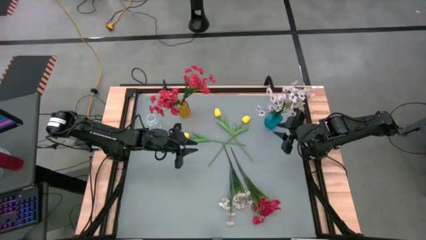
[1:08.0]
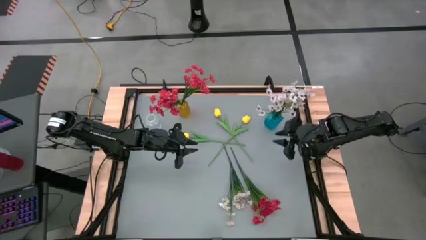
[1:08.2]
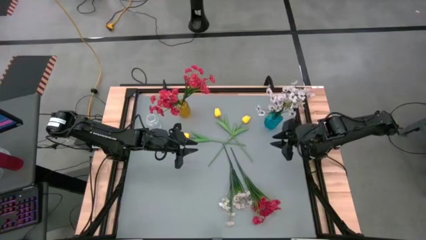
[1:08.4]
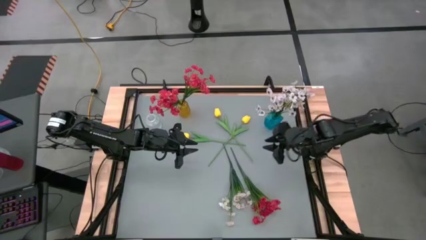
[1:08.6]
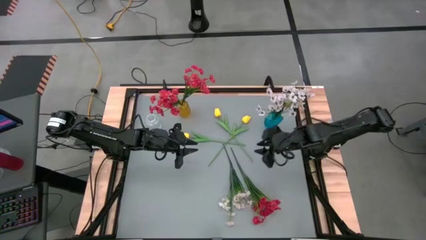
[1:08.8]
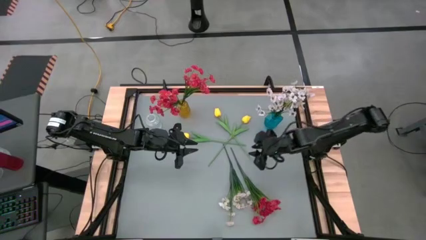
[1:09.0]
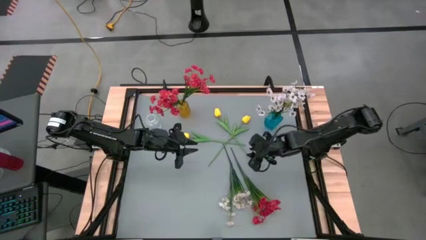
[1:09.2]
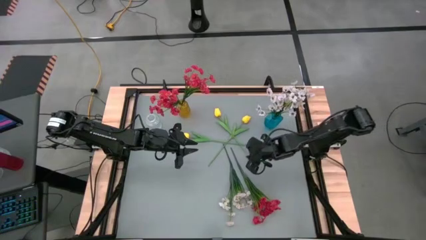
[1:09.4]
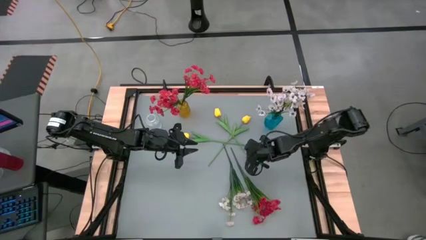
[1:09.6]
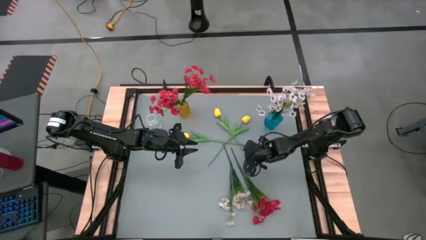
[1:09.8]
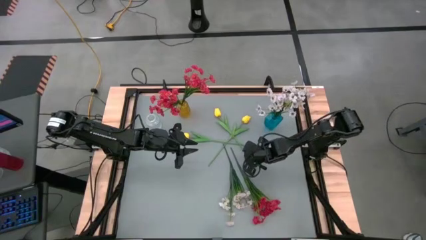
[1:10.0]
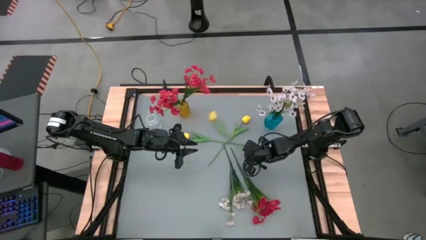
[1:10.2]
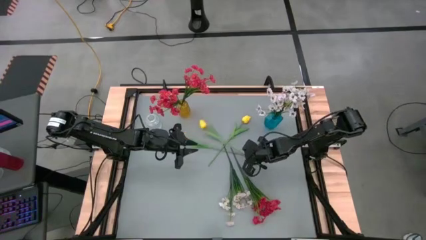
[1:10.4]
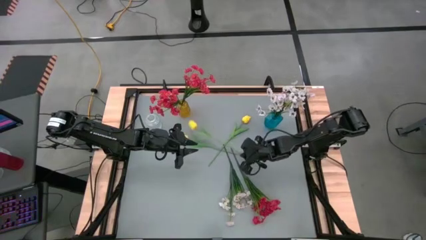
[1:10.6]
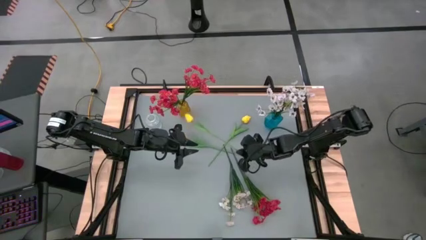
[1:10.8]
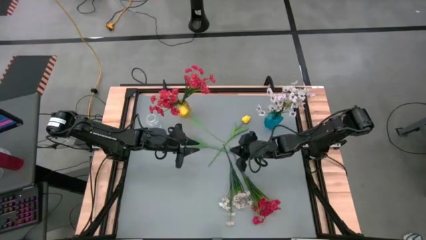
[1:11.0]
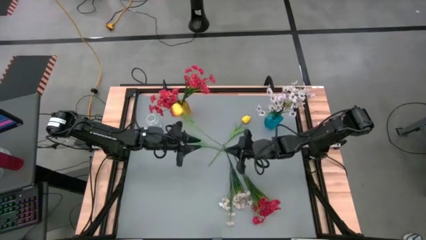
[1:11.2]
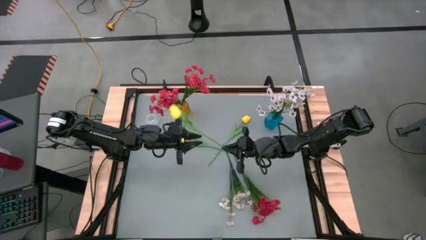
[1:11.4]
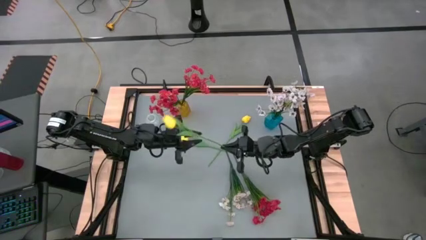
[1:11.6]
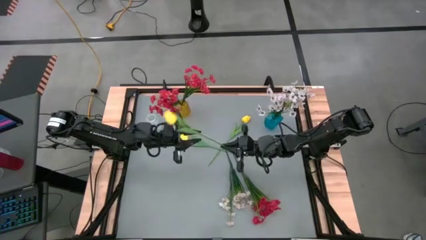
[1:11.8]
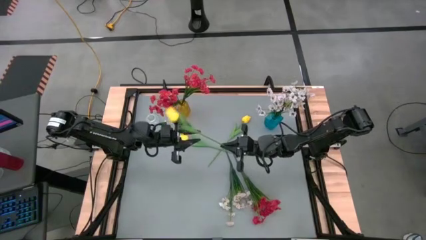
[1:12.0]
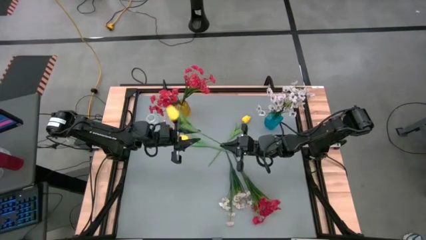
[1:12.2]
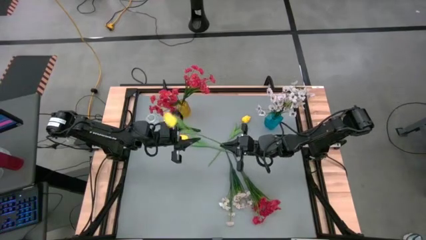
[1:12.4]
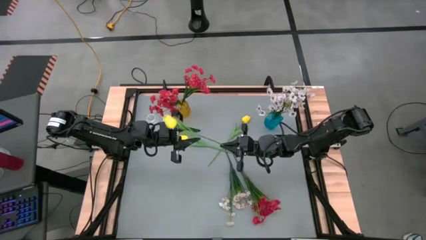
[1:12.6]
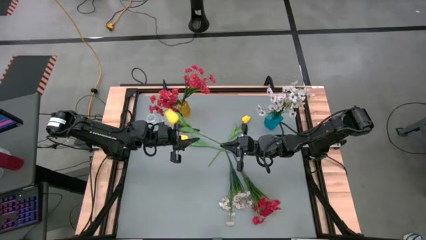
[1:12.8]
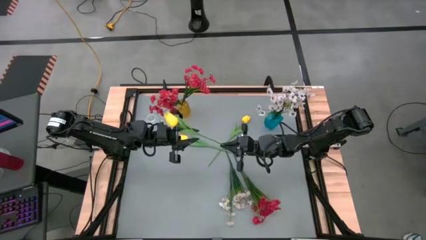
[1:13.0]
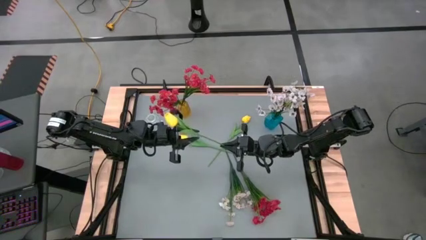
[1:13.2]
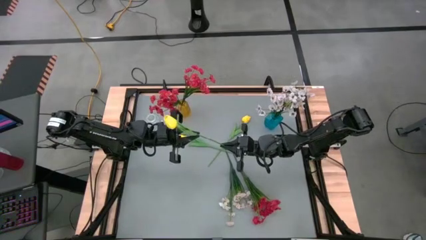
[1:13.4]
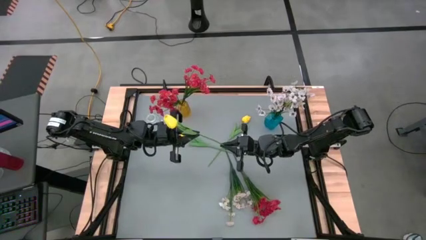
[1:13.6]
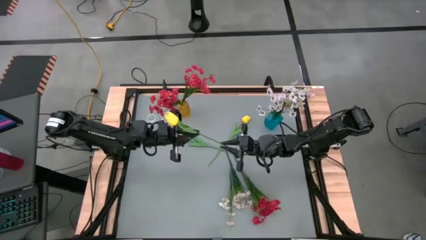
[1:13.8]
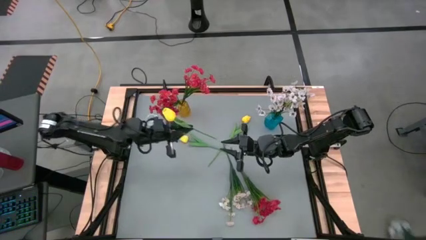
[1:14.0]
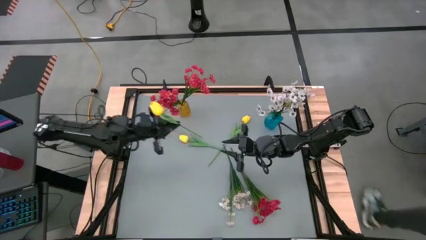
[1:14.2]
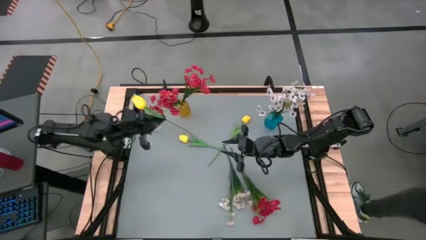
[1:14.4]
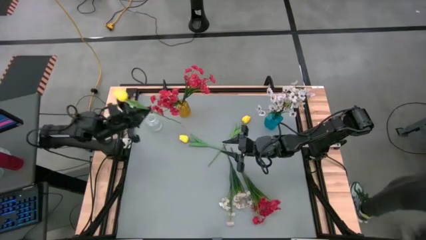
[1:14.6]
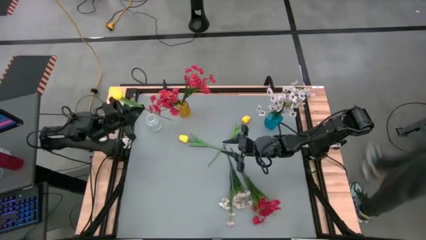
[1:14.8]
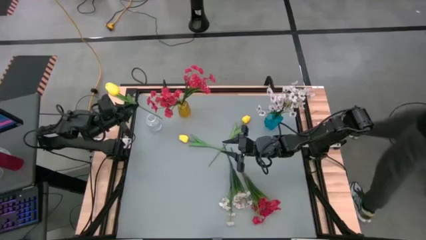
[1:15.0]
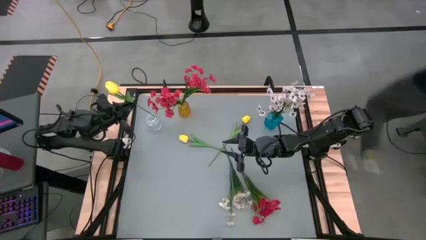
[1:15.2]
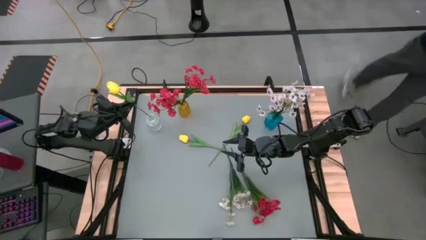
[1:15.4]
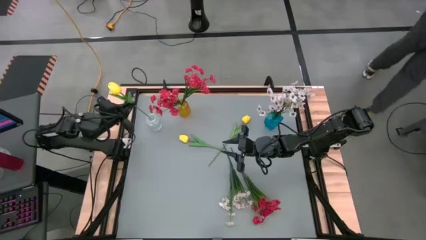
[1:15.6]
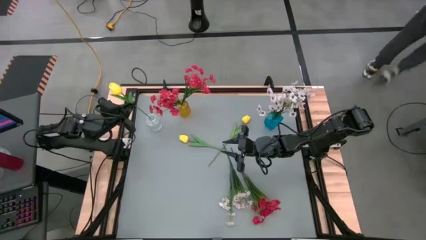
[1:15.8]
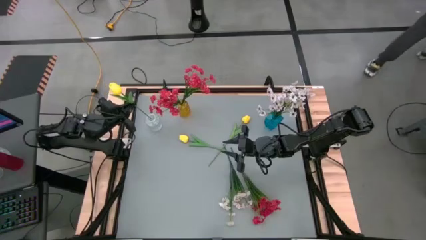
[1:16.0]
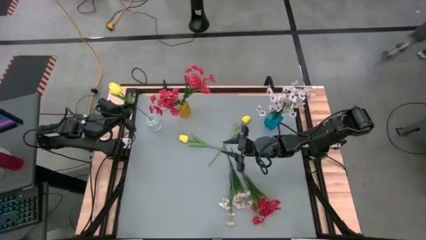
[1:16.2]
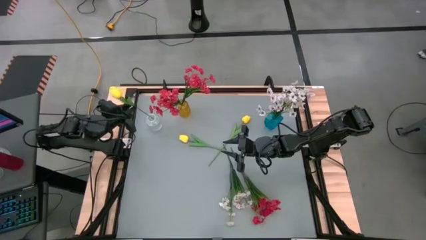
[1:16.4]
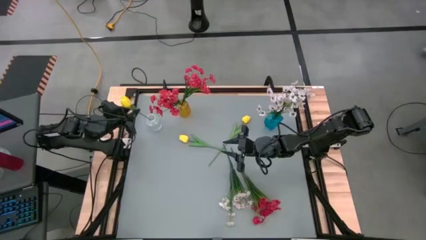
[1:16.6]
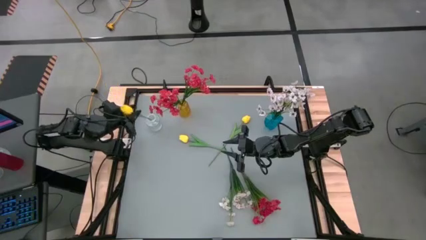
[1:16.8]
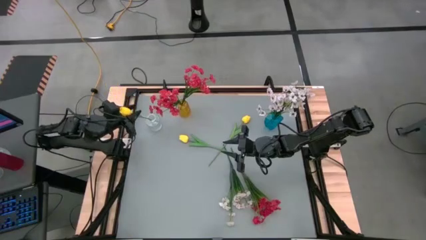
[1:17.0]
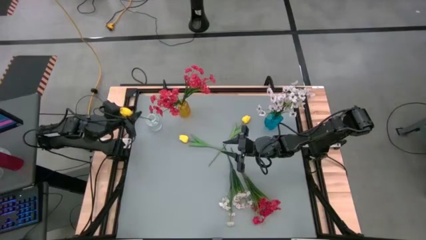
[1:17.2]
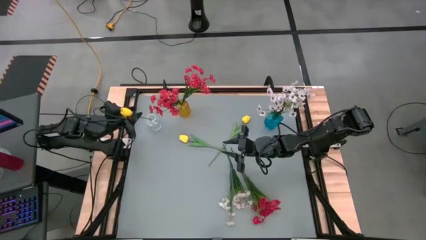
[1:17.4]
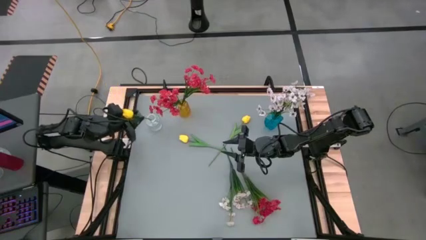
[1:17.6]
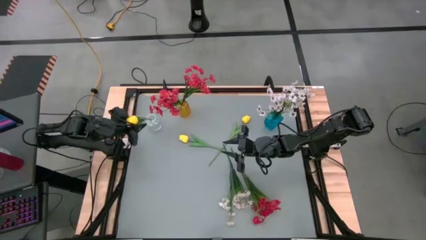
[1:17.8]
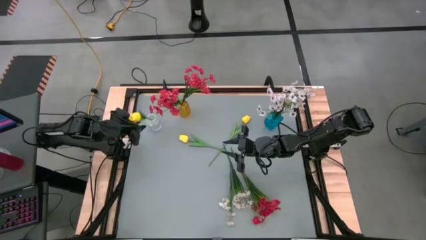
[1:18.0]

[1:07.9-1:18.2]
Task: Sort flowers into vase by color
Put the middle yellow tulip into the transparent vase

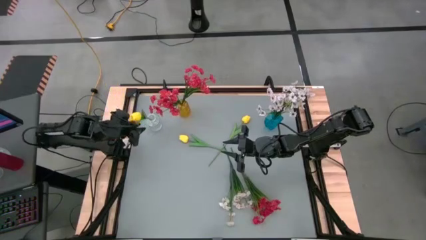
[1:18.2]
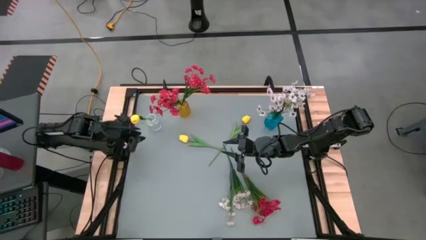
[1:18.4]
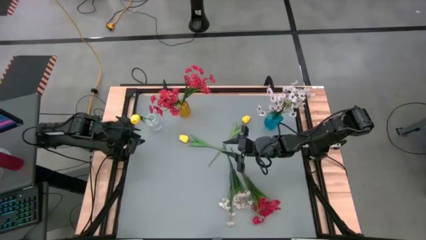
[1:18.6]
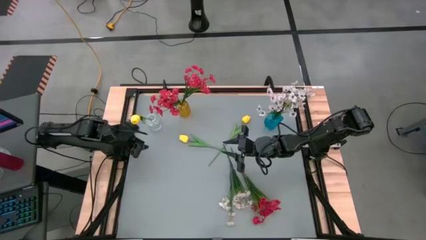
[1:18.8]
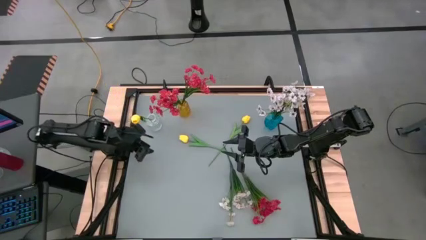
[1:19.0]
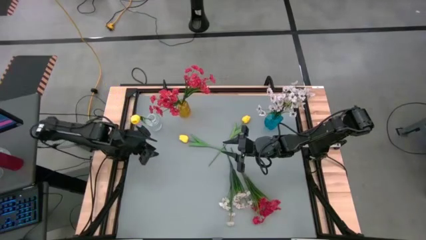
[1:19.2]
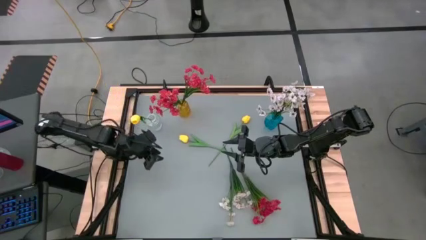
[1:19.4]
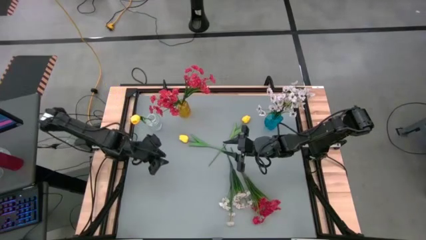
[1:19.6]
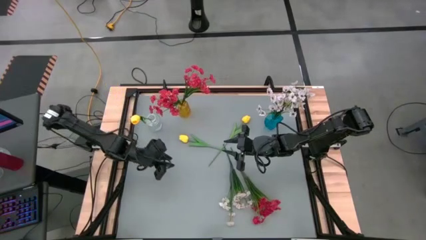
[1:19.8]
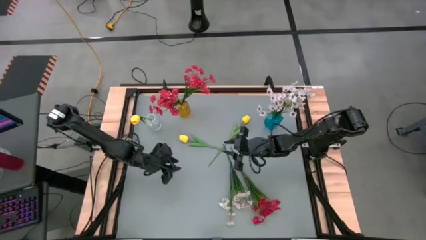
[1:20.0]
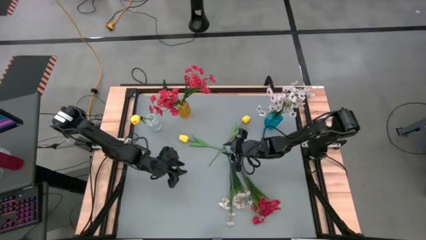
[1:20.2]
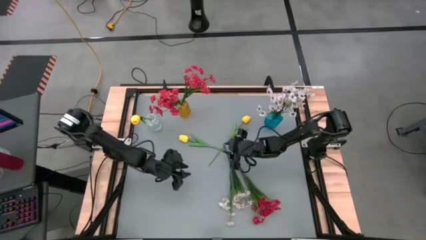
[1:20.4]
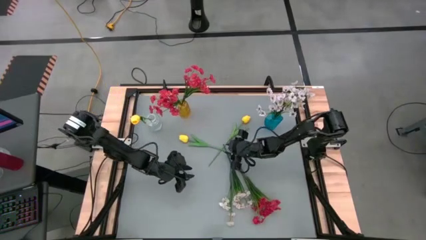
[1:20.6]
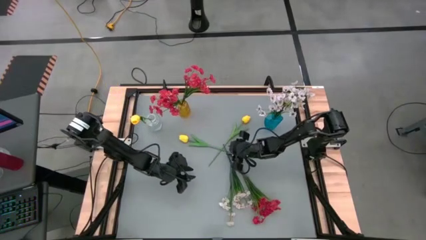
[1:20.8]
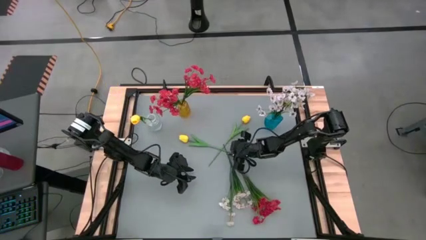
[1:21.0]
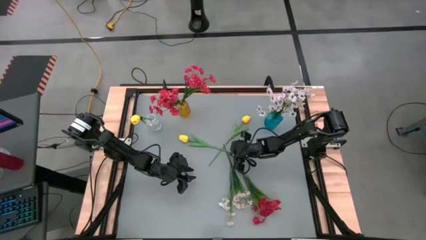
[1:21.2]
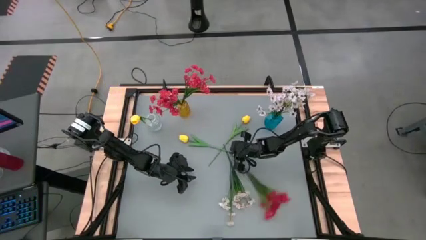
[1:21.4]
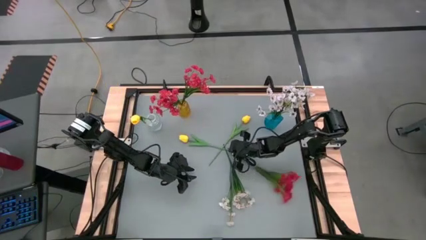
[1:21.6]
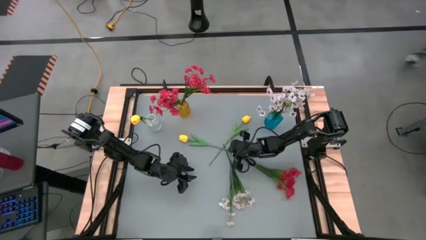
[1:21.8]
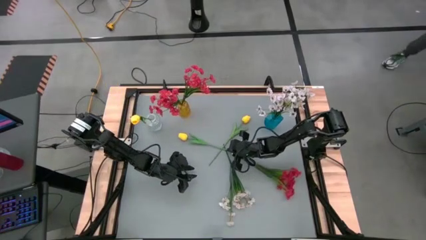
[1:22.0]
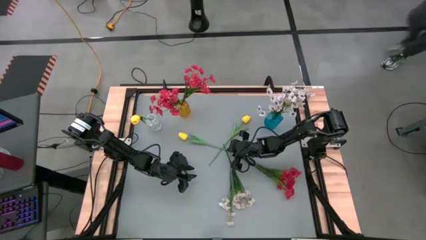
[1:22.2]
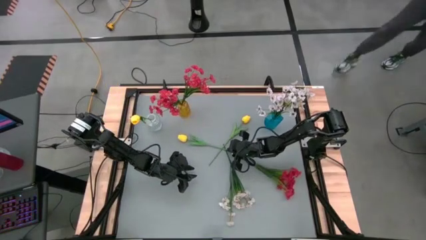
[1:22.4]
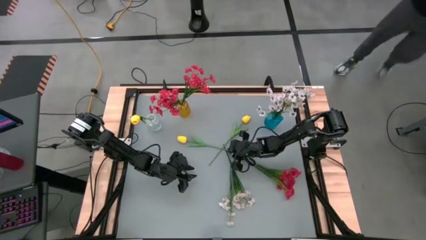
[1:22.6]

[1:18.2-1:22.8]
Put the bottom yellow tulip into the transparent vase
